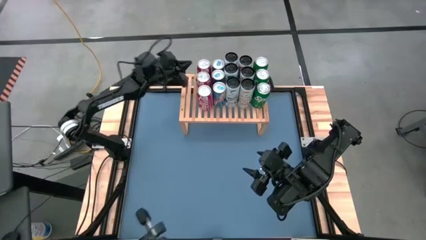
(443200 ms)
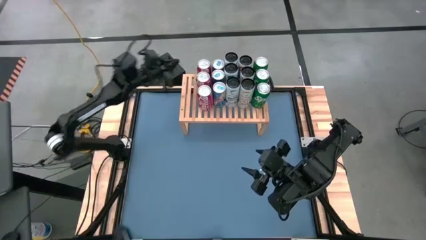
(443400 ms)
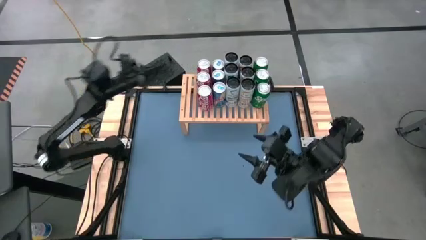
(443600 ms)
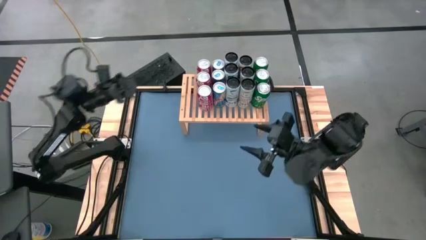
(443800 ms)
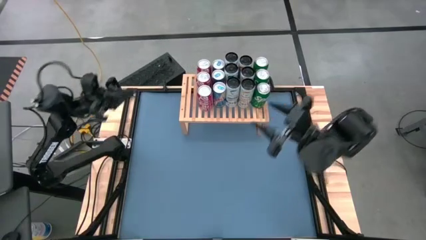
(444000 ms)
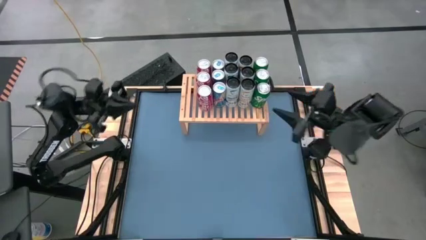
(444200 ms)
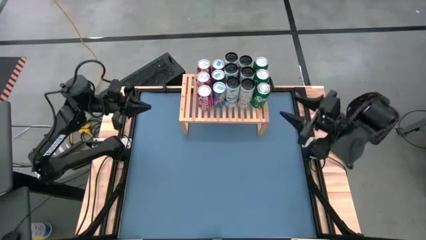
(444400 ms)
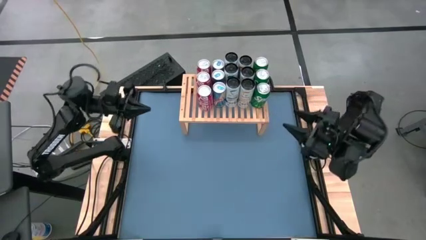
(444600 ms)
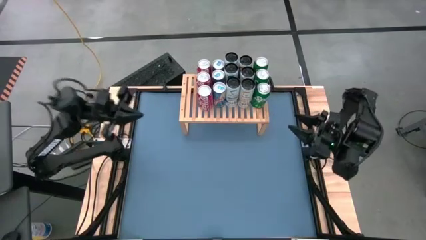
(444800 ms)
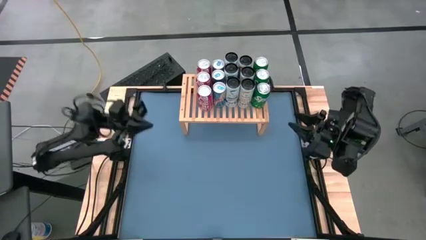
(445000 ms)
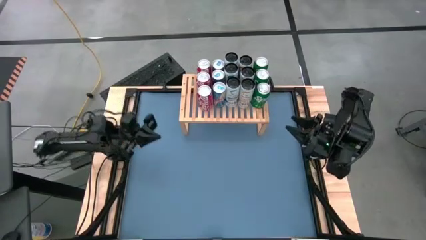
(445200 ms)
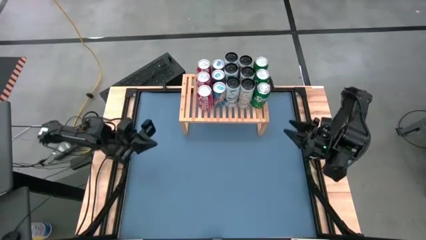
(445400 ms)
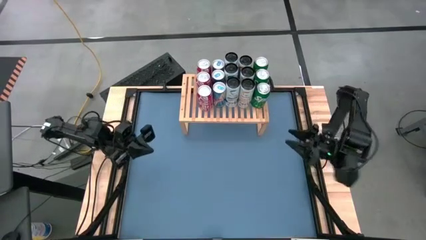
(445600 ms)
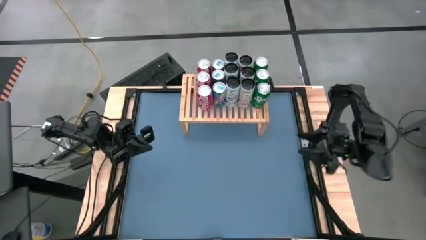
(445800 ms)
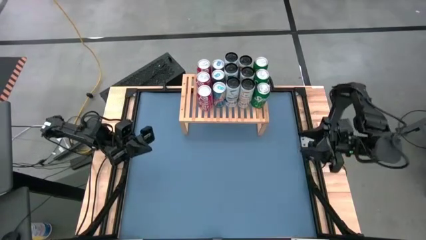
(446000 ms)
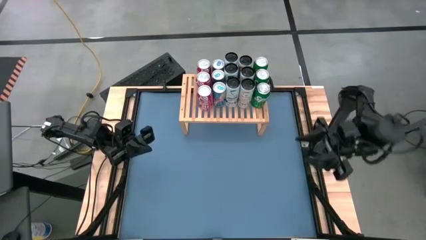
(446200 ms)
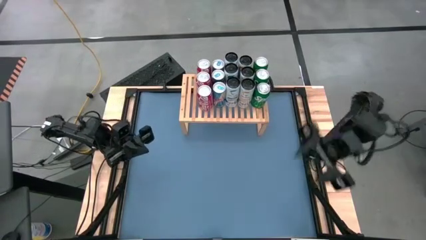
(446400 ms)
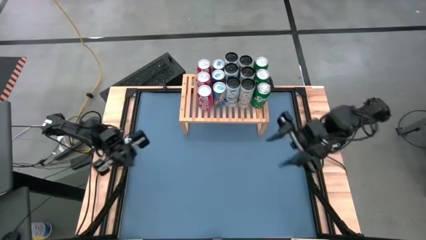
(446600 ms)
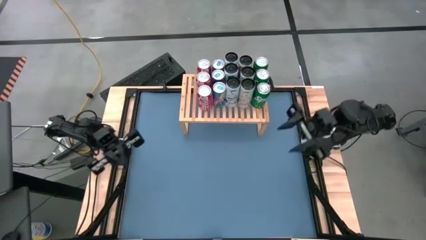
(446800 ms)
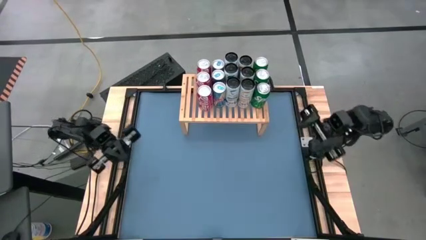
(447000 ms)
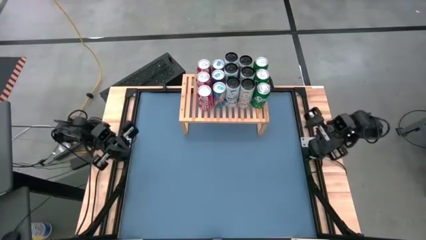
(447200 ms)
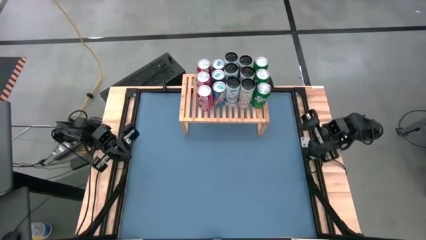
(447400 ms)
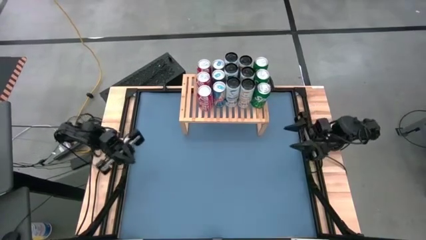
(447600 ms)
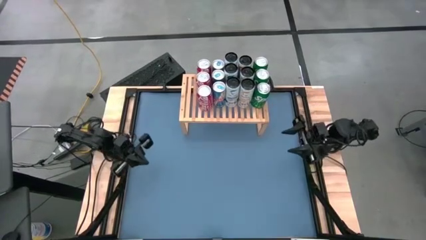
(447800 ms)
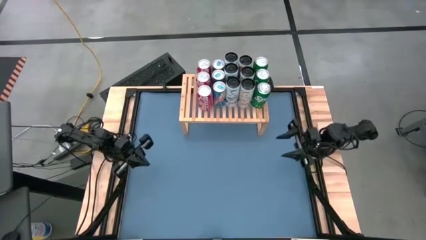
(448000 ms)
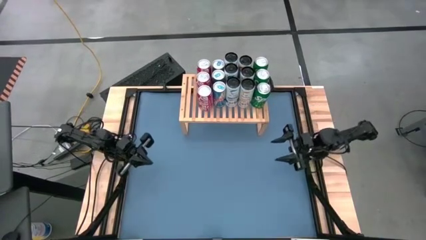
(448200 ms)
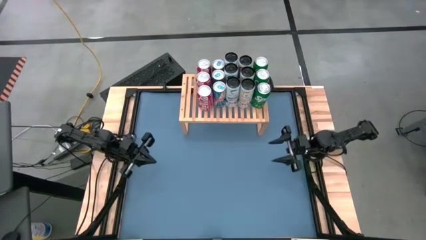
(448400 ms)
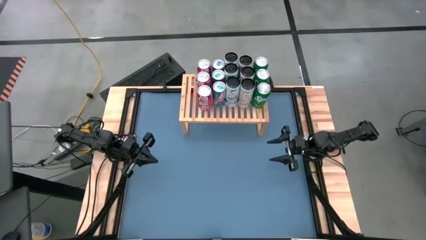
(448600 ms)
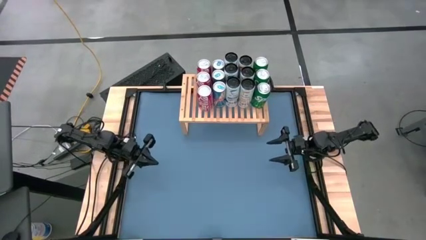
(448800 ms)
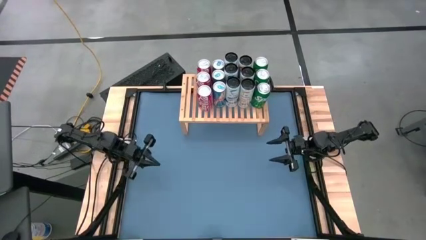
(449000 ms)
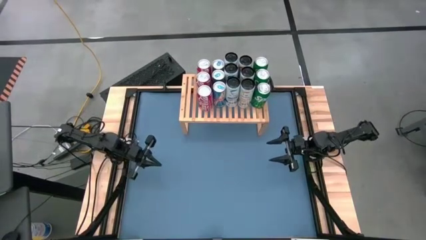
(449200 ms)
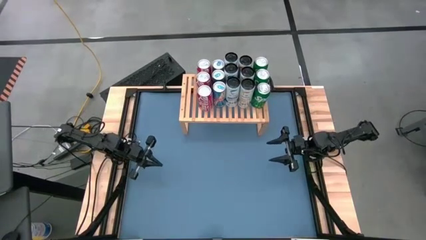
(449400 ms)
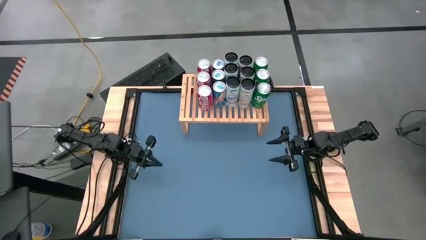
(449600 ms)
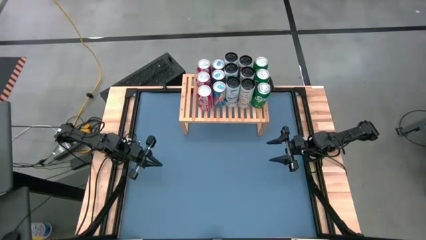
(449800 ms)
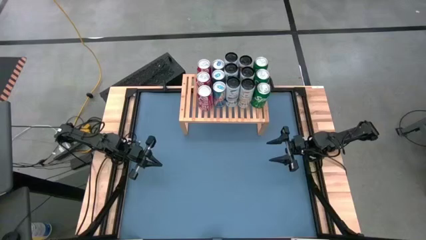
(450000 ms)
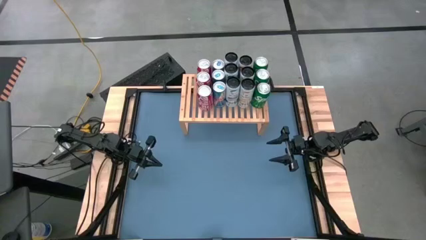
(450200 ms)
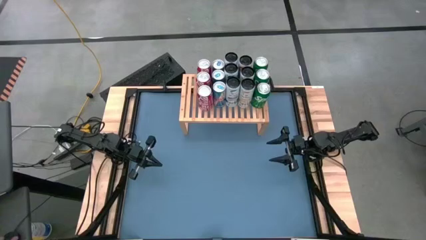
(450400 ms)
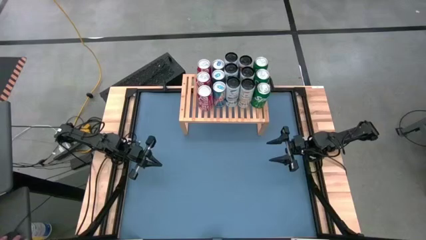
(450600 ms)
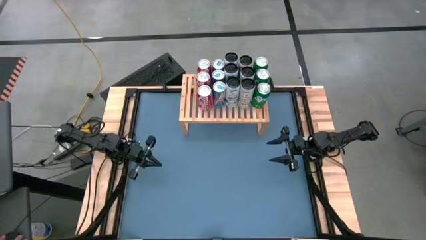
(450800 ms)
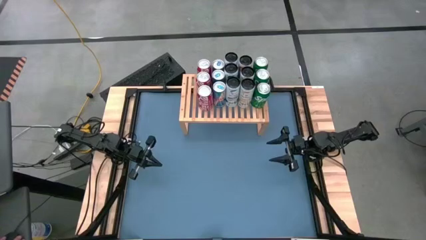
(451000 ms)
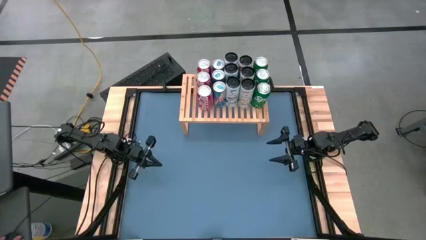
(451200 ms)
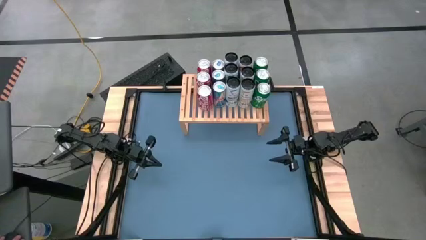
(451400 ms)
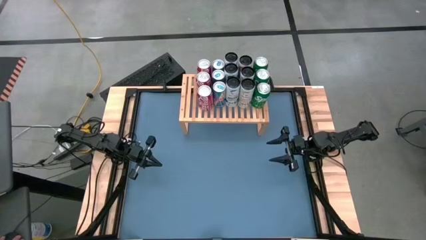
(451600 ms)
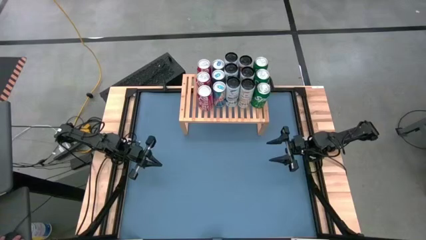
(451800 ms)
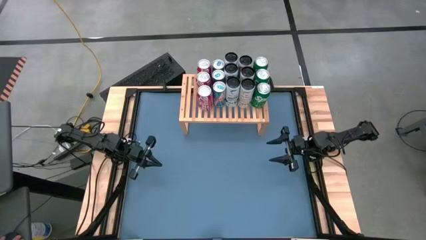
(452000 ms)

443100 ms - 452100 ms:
Task: Place canned beverage on shelf
Return to Home Position

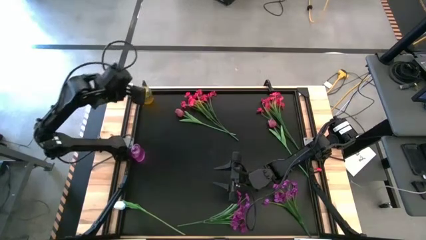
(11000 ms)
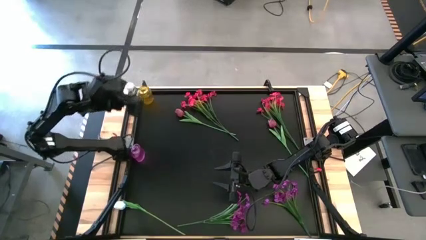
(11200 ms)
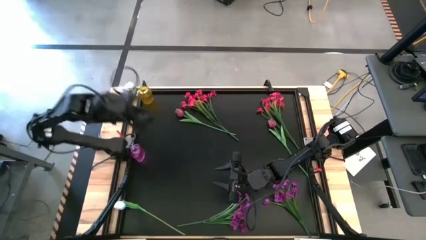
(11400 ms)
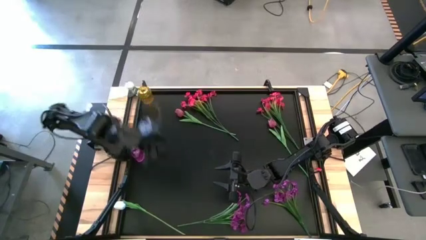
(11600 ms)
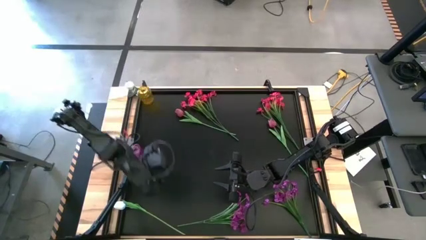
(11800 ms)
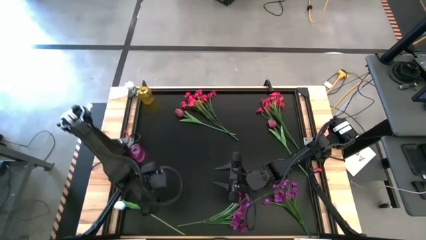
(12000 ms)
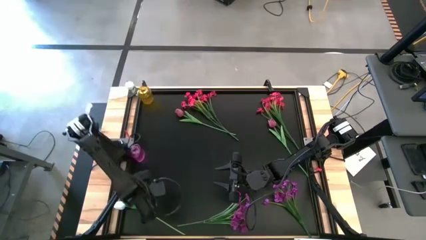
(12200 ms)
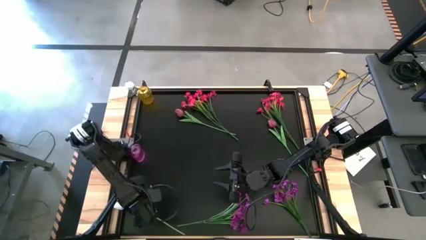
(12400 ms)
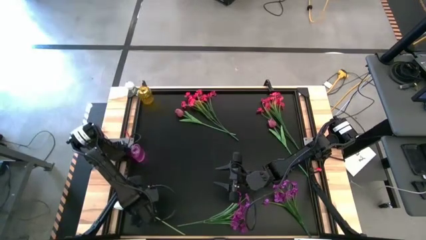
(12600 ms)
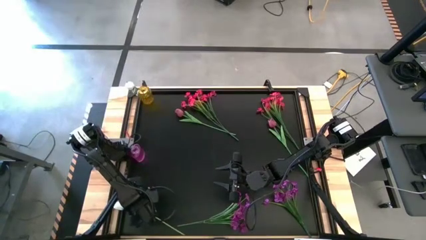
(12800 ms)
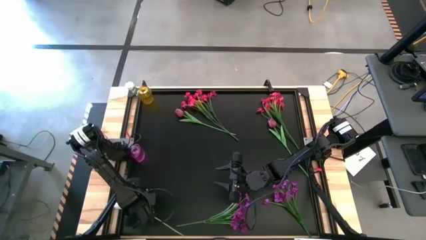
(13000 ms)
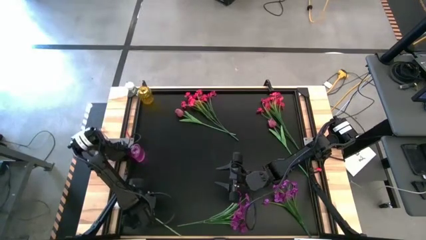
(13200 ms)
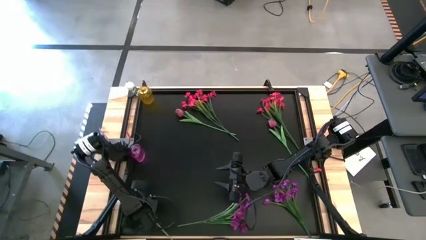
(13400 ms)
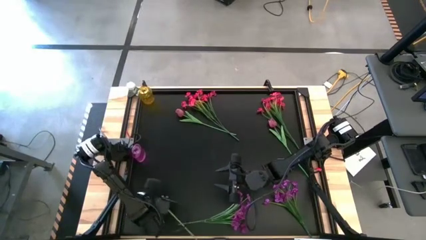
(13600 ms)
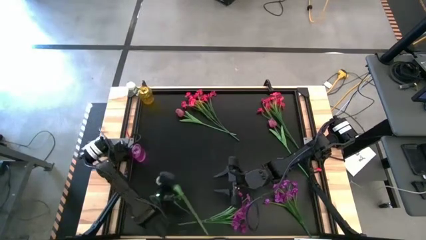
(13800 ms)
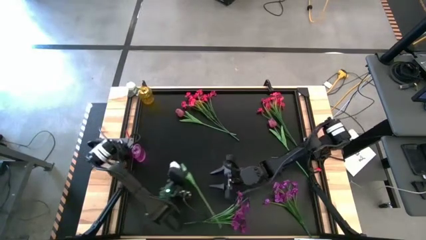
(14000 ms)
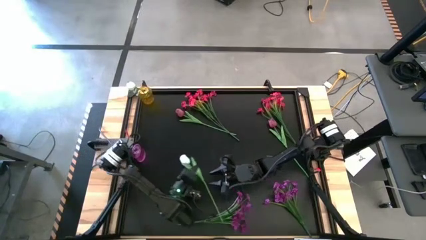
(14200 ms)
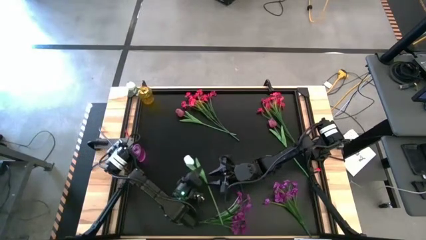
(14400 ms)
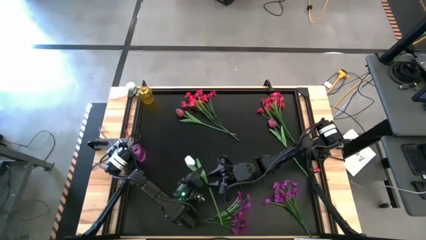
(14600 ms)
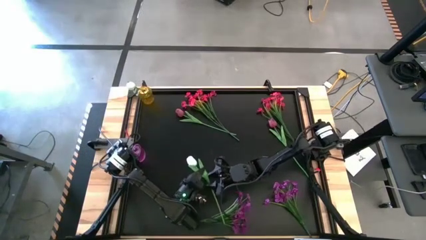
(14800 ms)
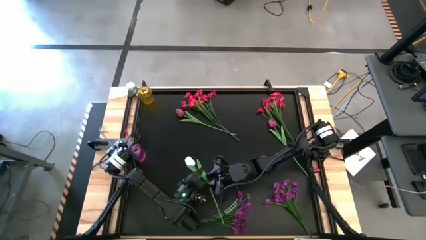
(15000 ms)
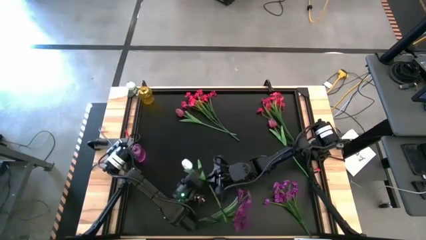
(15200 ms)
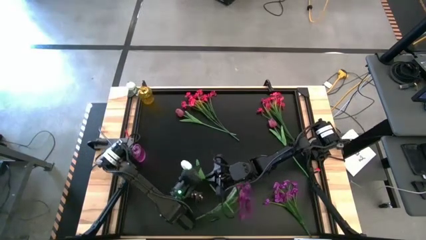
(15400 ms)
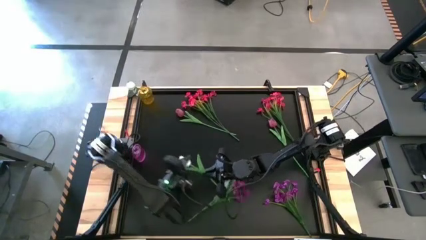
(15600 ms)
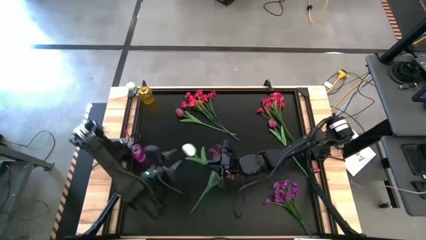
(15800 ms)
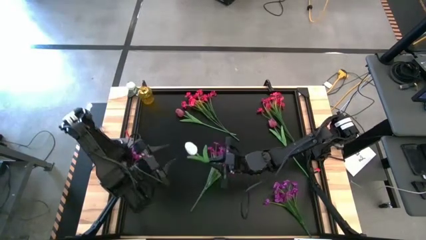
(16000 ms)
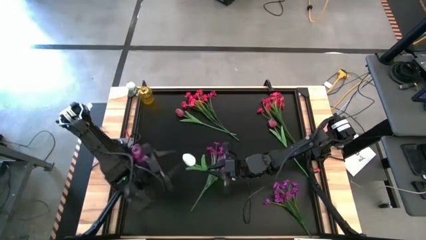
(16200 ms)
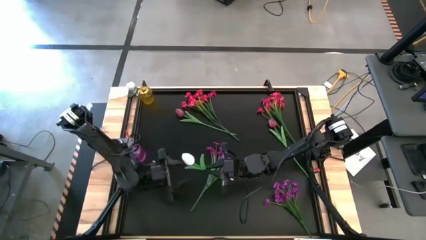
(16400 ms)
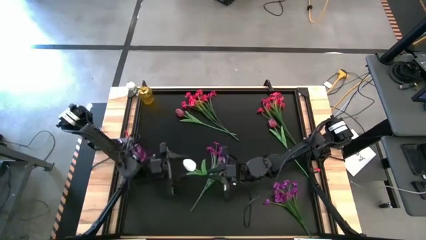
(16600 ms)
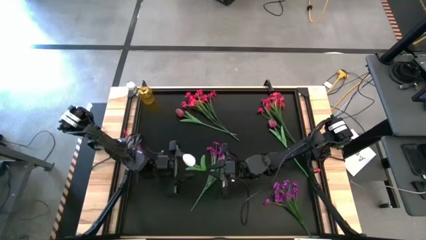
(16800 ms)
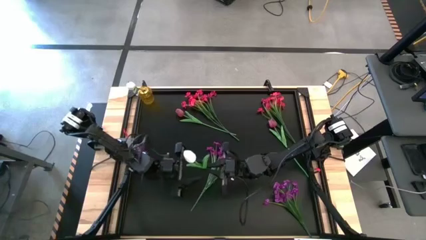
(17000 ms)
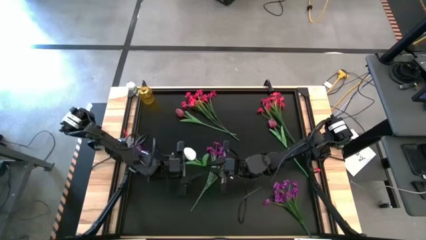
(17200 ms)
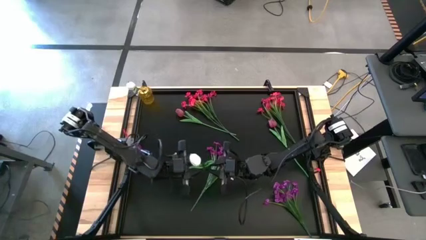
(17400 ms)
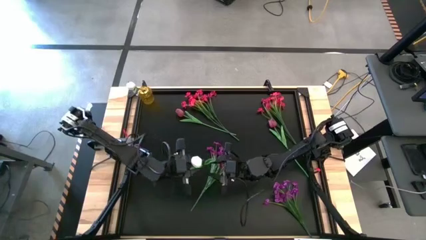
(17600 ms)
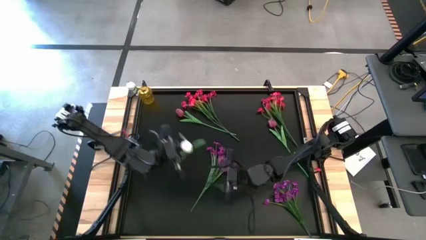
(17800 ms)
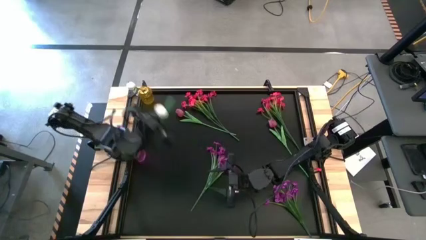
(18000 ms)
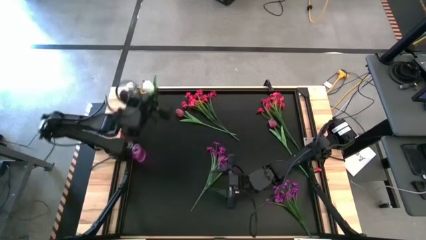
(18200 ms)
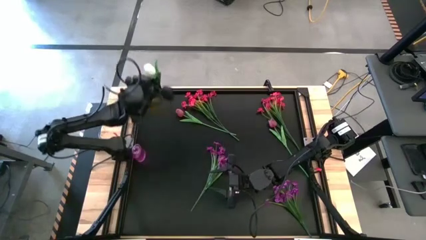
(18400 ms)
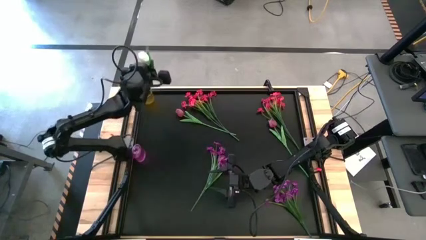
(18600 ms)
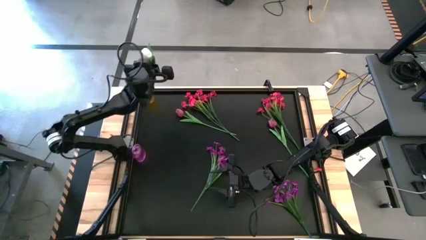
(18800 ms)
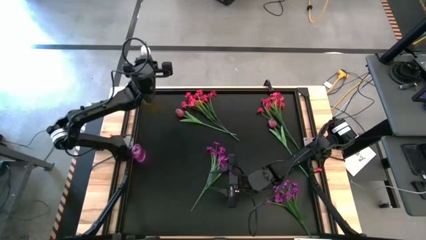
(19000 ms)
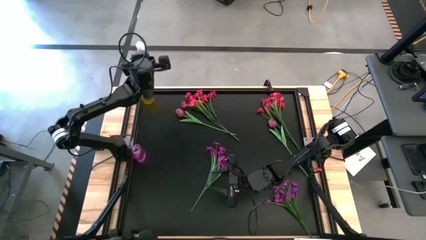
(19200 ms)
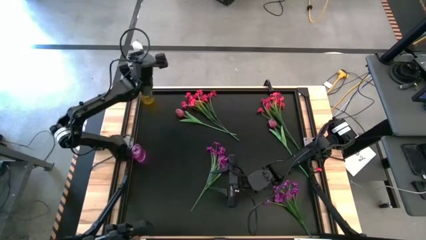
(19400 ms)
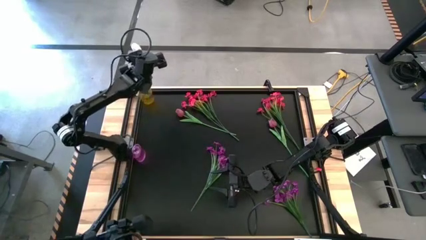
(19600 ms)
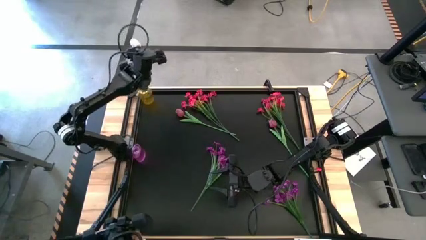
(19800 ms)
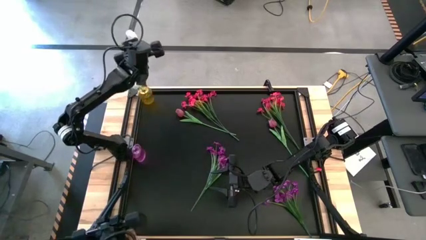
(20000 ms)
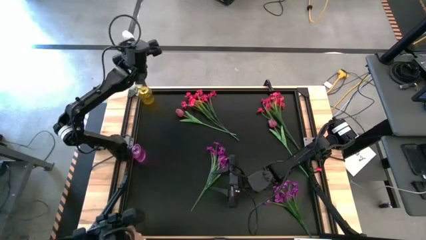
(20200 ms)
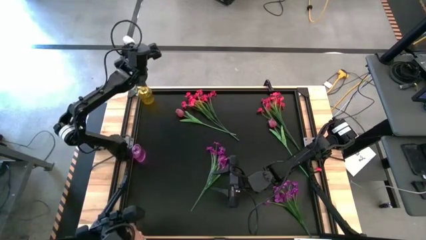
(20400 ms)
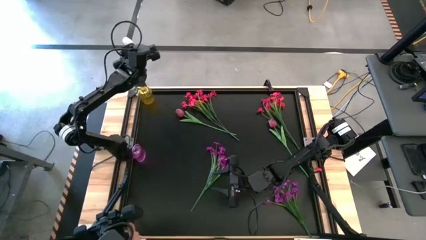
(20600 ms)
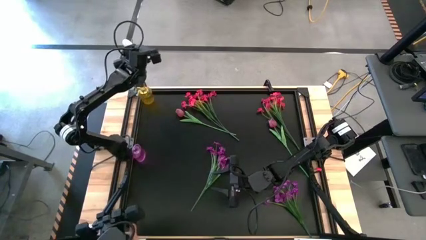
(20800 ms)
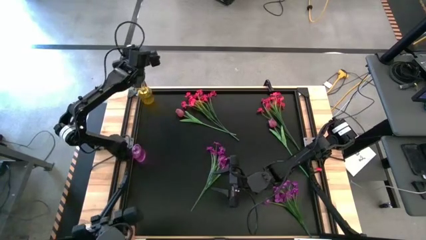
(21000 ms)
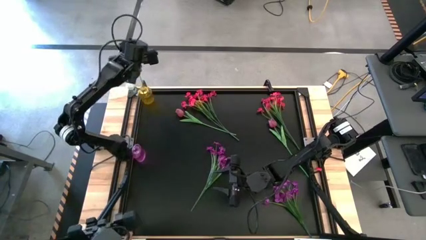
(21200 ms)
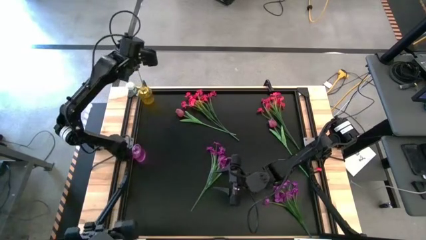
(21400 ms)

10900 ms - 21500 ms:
Task: Sort flowers into vase by color
Put the white flower into the yellow vase
